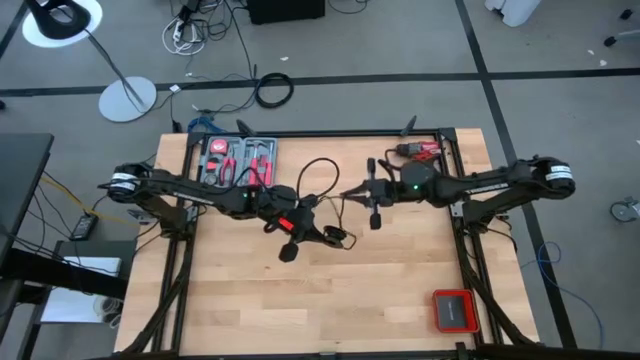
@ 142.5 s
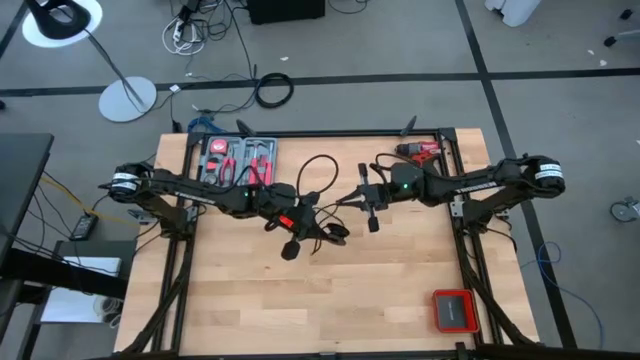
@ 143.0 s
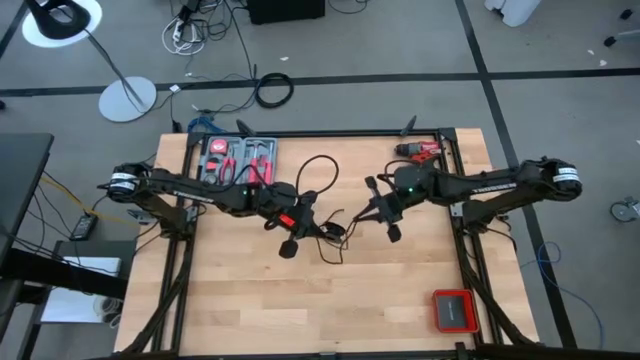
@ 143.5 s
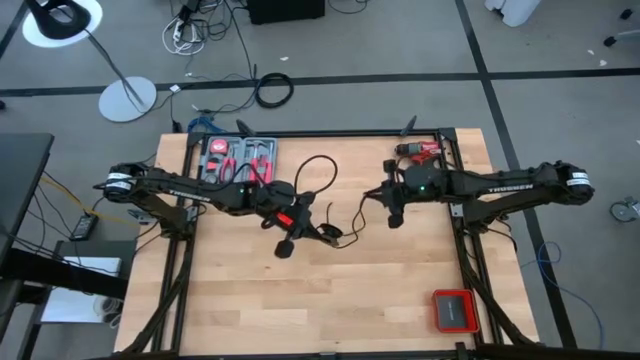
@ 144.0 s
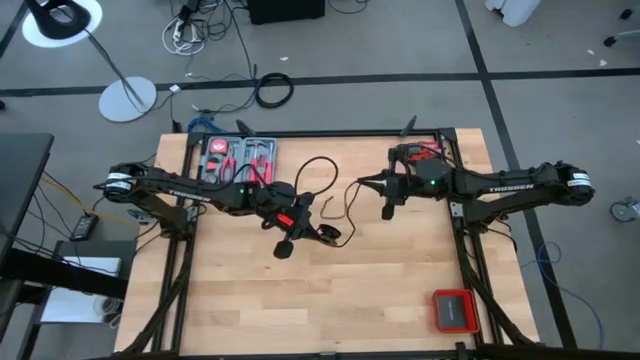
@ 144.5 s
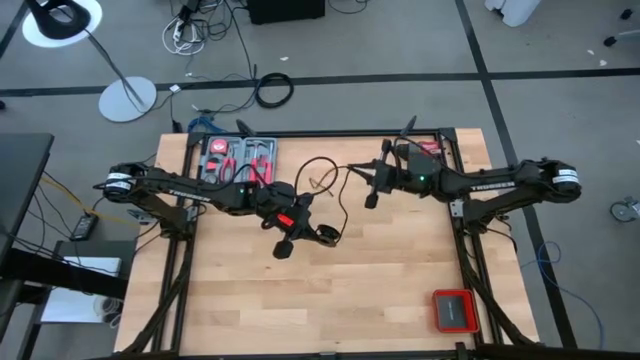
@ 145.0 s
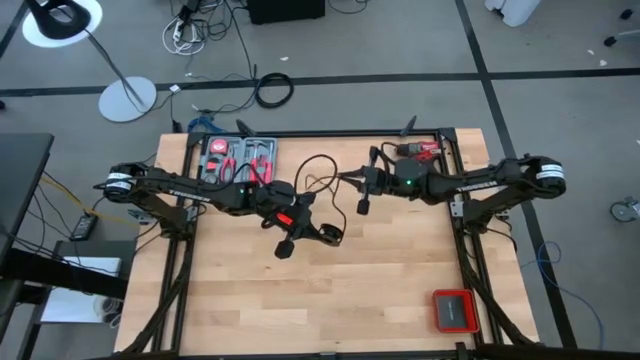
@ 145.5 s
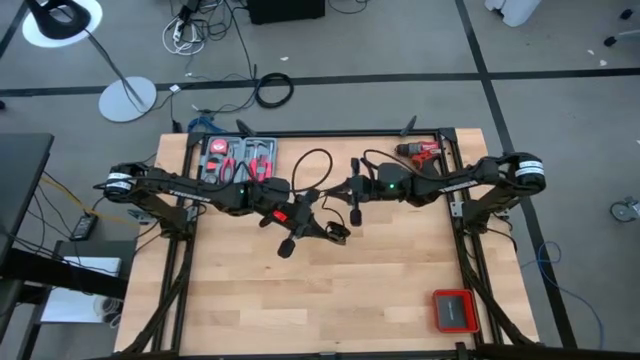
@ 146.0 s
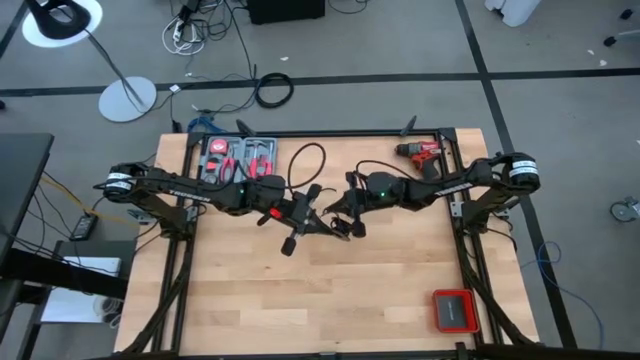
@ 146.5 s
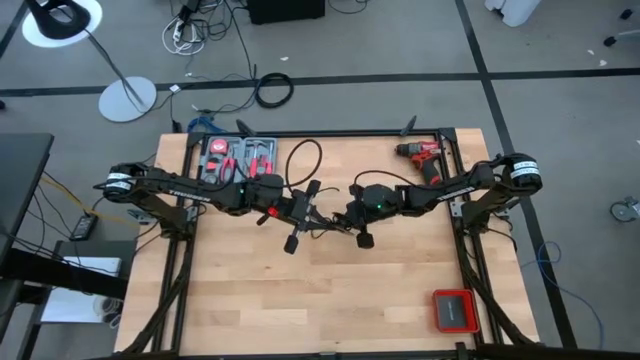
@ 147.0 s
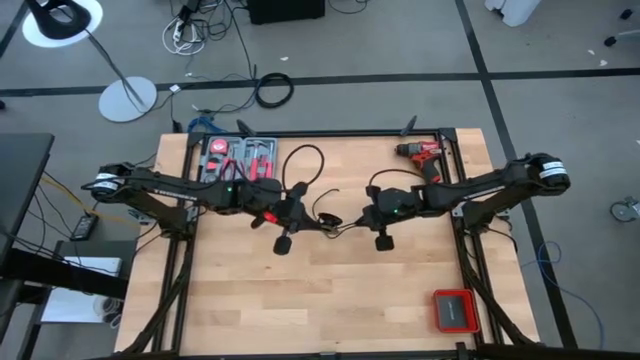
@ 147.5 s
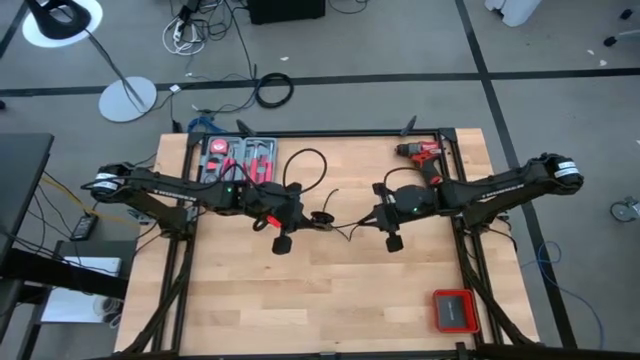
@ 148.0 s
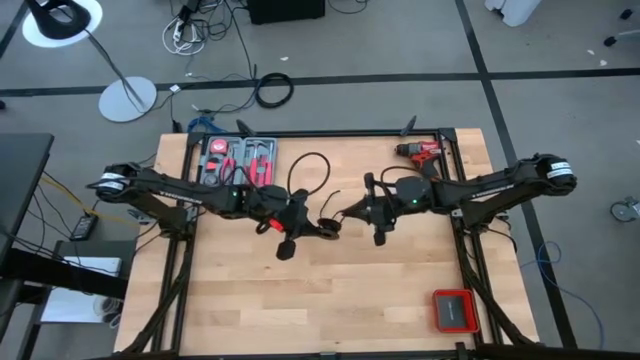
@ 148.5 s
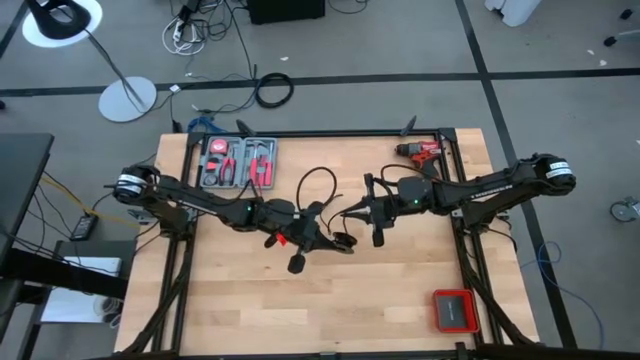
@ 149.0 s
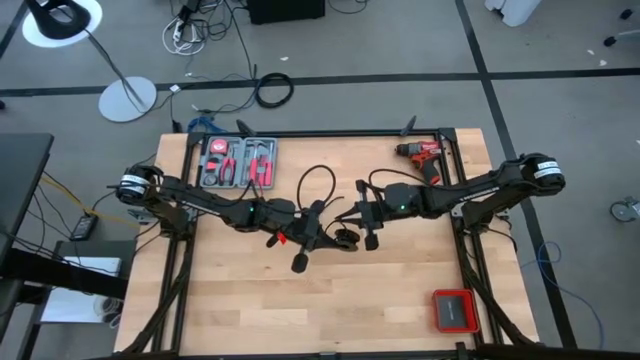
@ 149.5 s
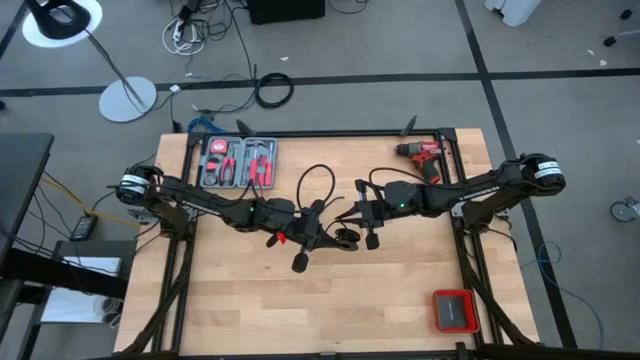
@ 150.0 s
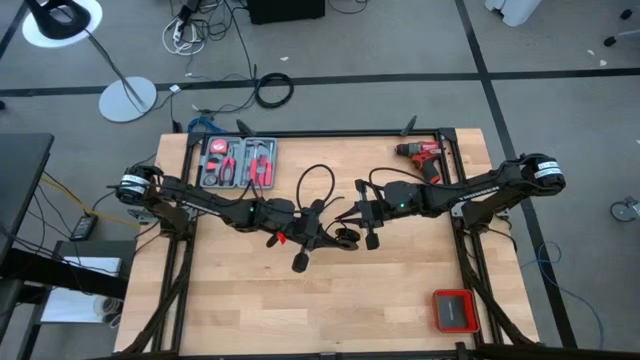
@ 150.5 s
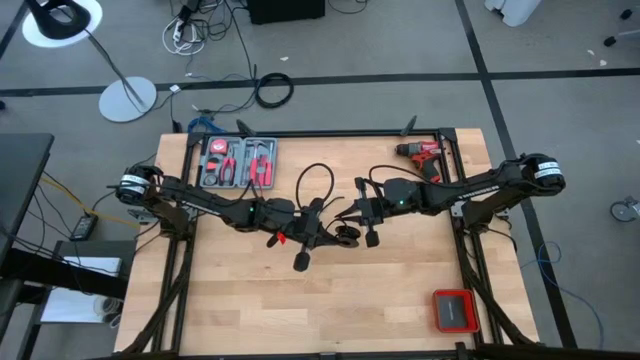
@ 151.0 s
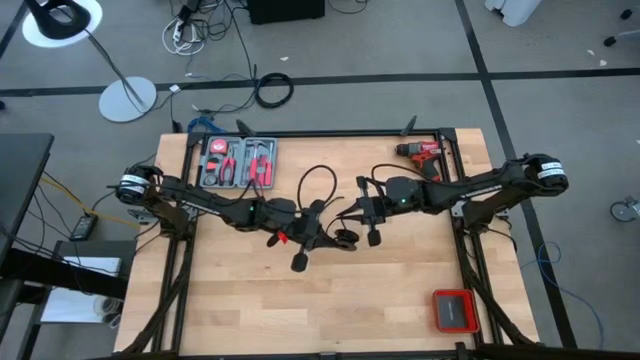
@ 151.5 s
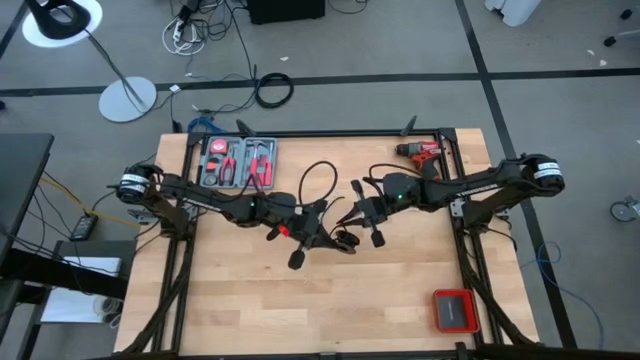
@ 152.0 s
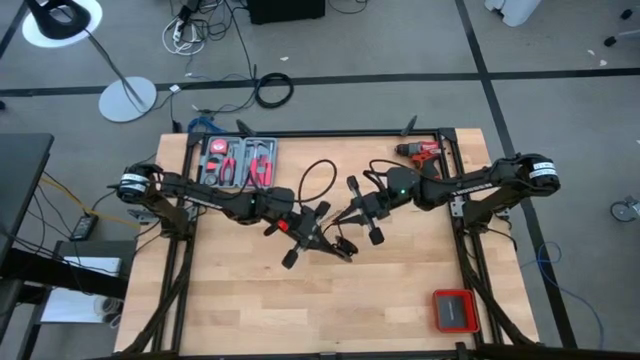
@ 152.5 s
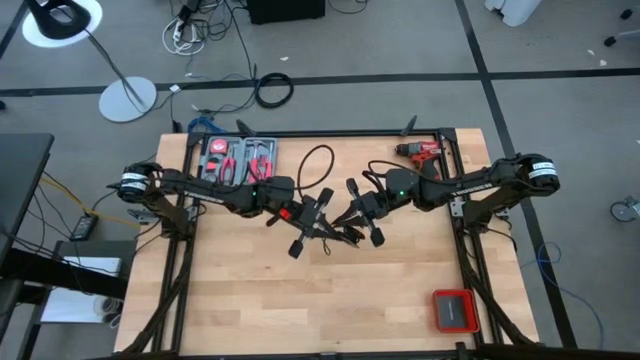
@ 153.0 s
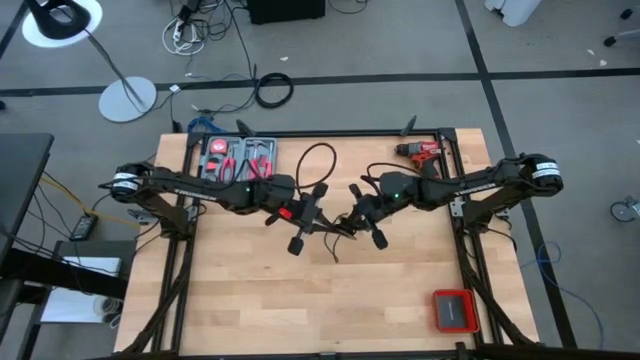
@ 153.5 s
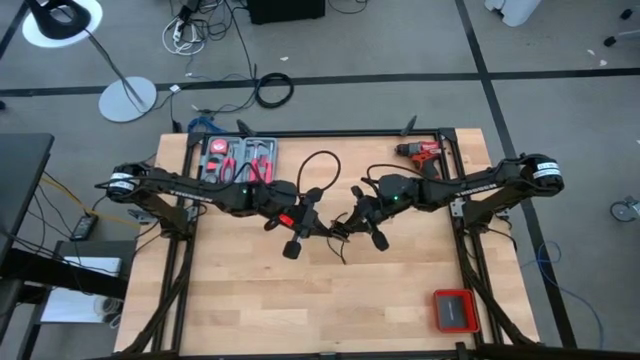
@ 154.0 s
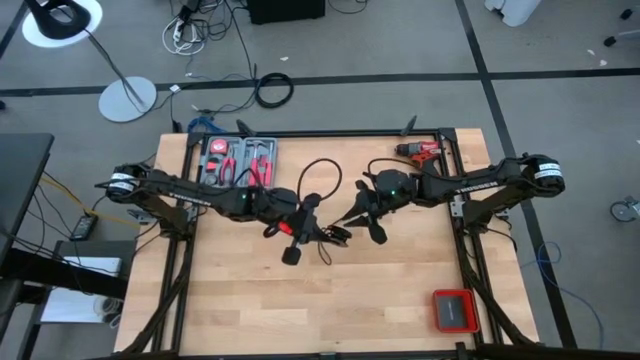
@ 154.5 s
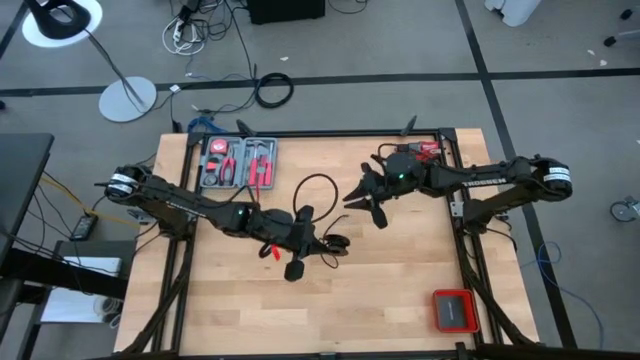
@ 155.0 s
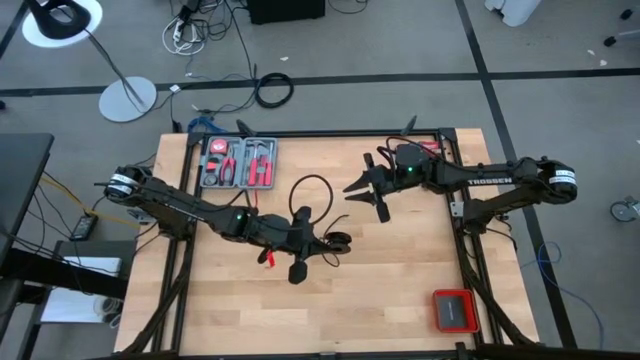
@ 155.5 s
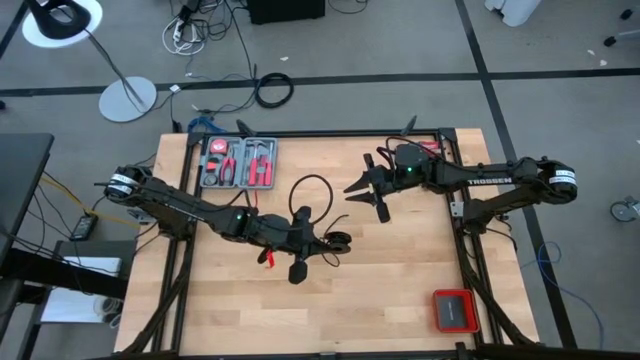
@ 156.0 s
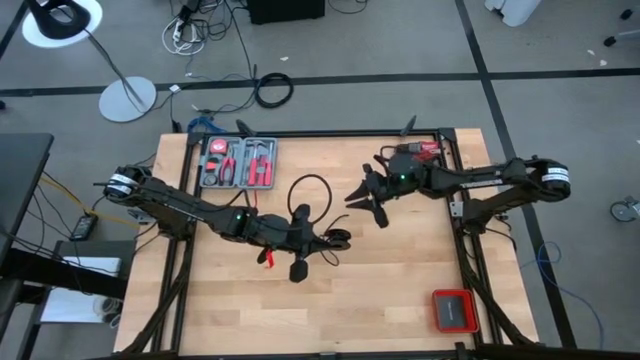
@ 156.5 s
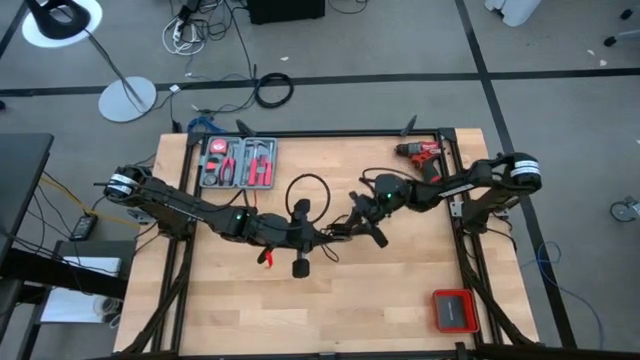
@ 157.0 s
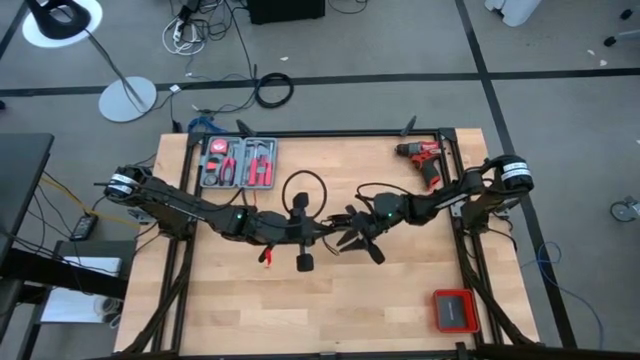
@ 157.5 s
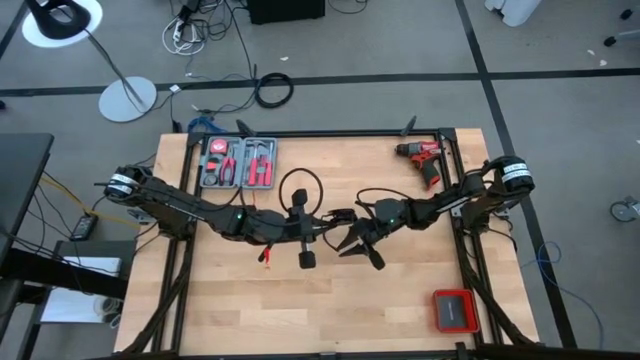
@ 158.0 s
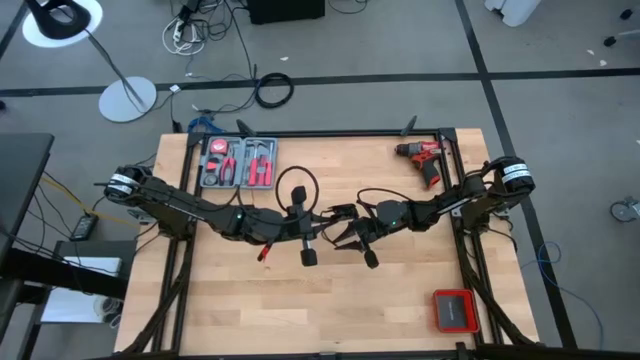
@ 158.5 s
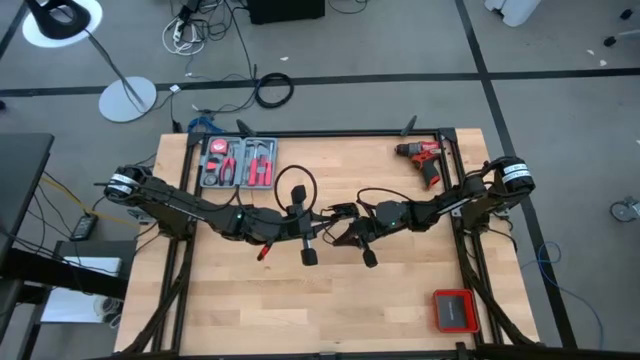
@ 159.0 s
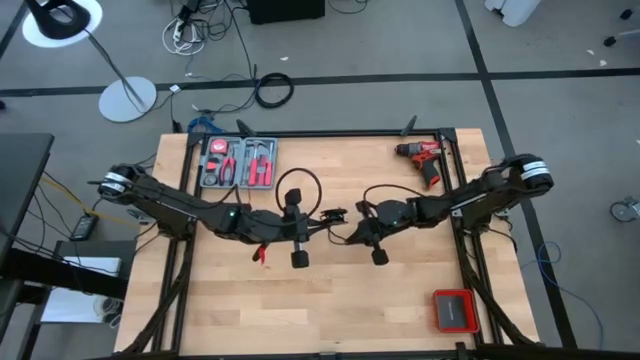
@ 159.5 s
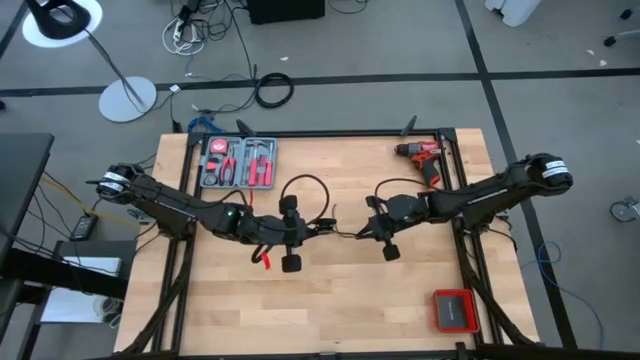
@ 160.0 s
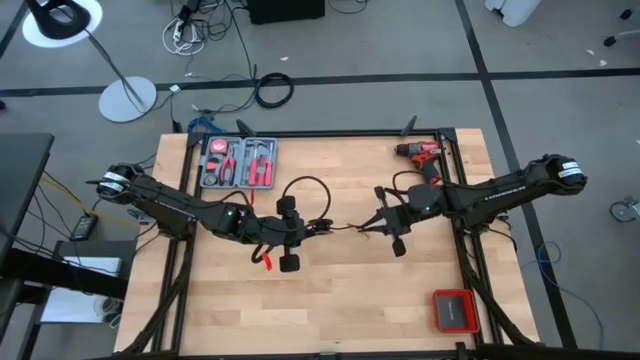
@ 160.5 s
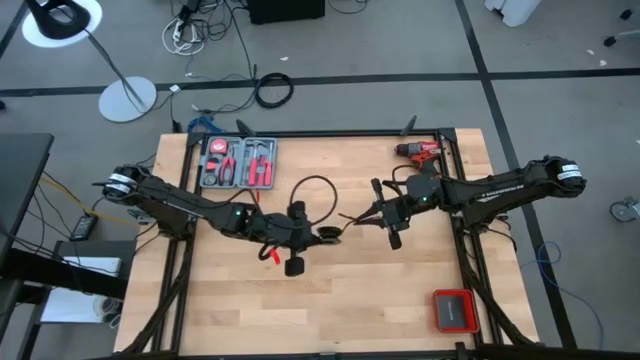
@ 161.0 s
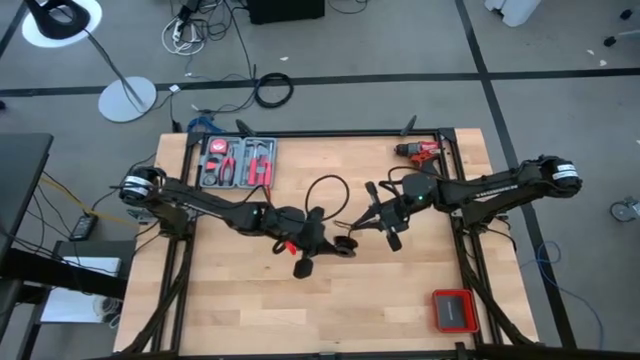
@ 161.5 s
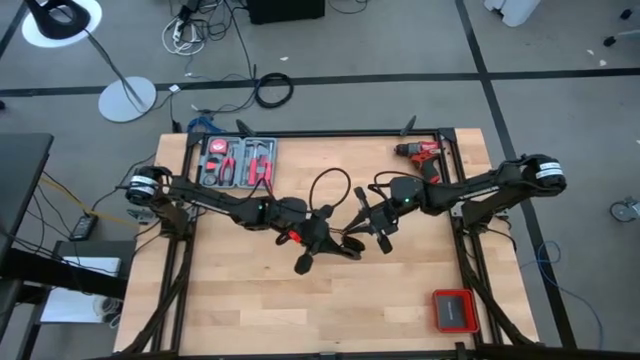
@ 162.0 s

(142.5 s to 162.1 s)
Task: Coil cords
Coil the black wire on the black spool

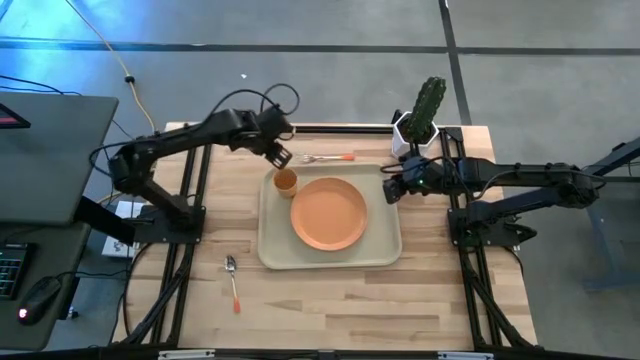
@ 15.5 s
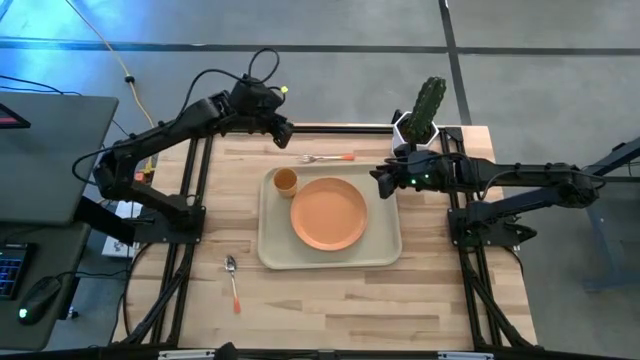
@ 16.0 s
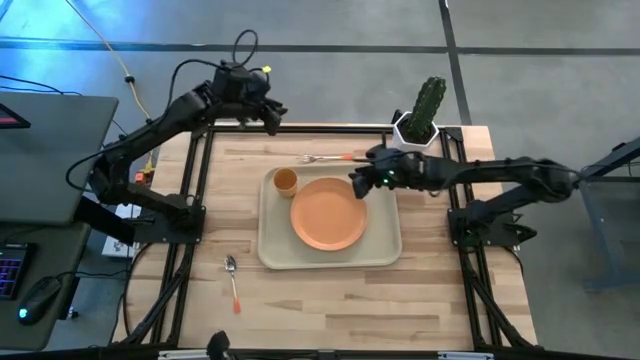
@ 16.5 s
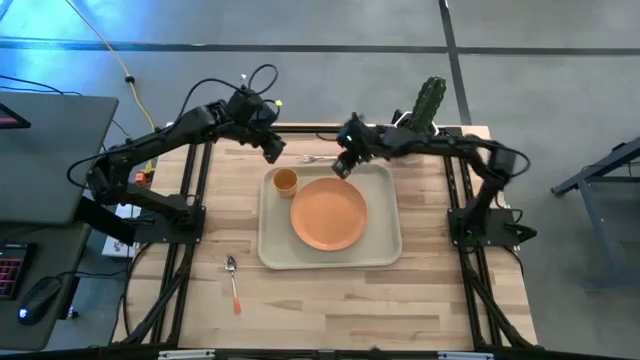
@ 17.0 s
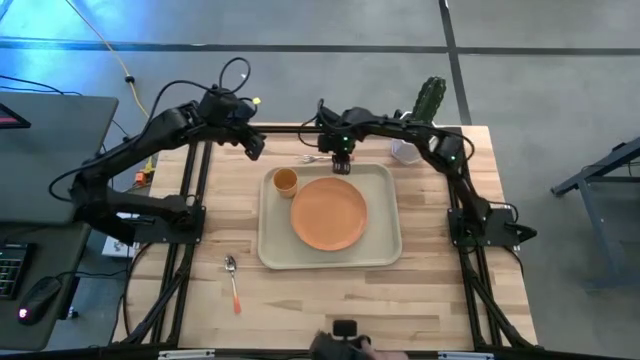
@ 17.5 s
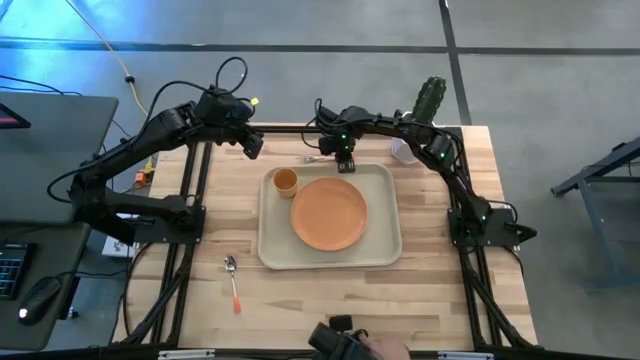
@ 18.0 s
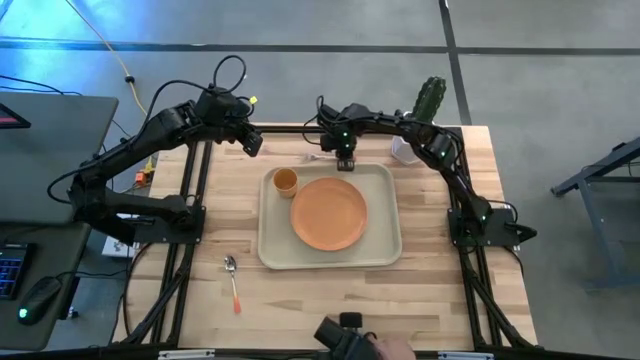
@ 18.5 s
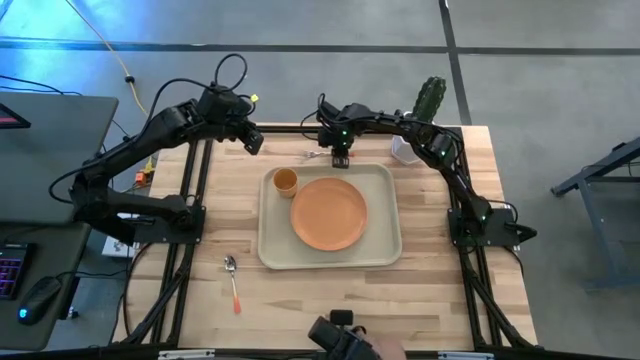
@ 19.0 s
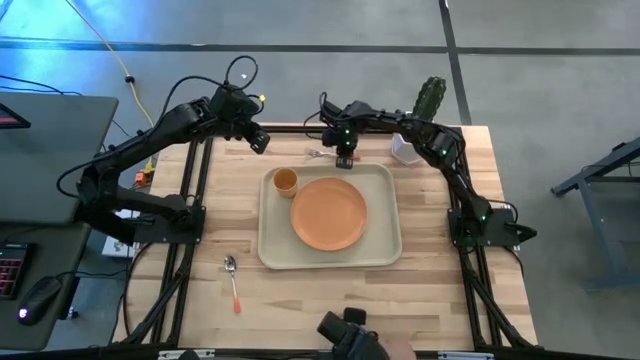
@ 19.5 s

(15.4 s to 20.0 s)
Task: Pick and place plate/cup/fork/spoon on tray
Put the orange fork on the off white tray on the left side of the orange plate
